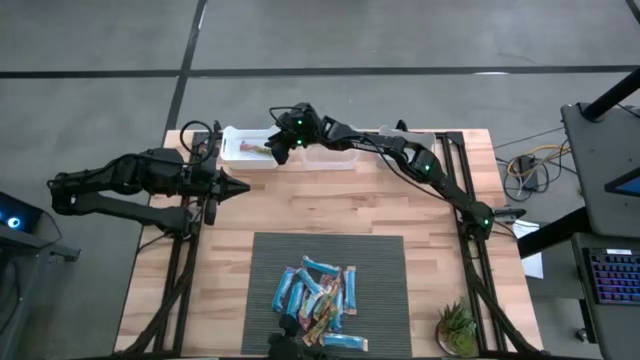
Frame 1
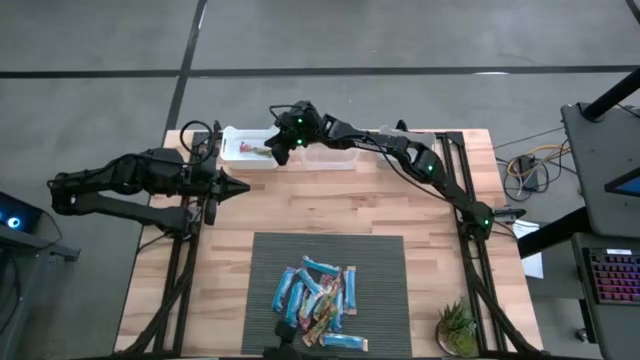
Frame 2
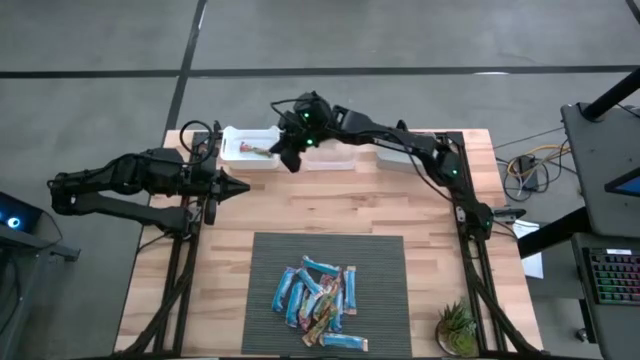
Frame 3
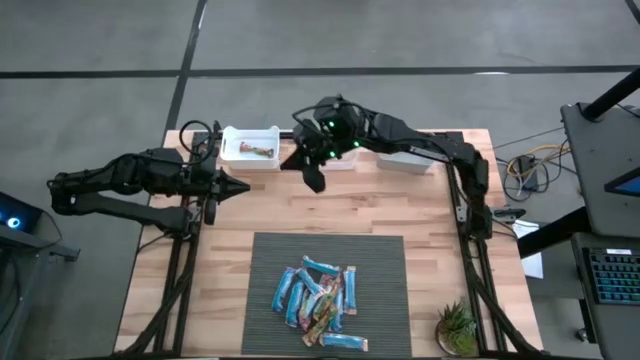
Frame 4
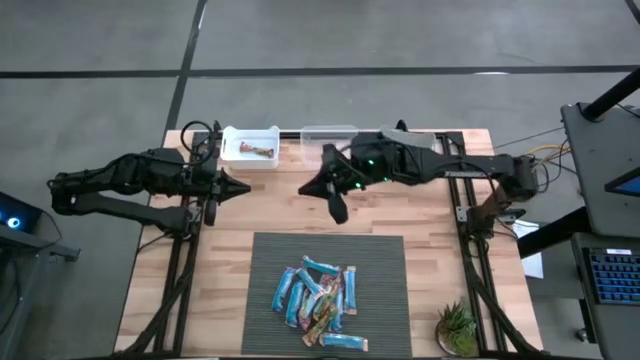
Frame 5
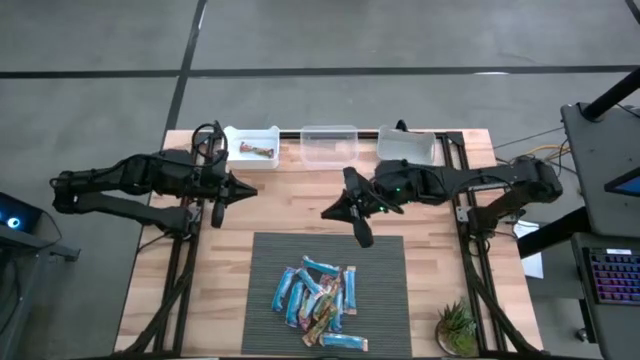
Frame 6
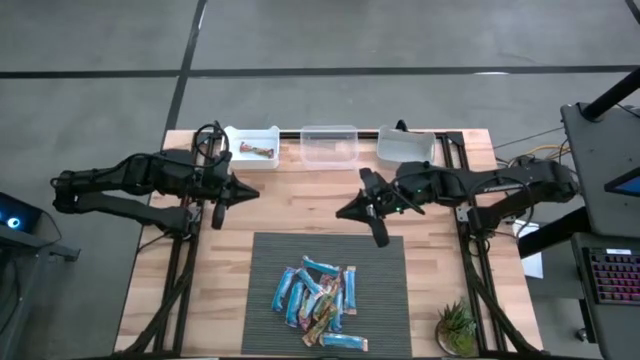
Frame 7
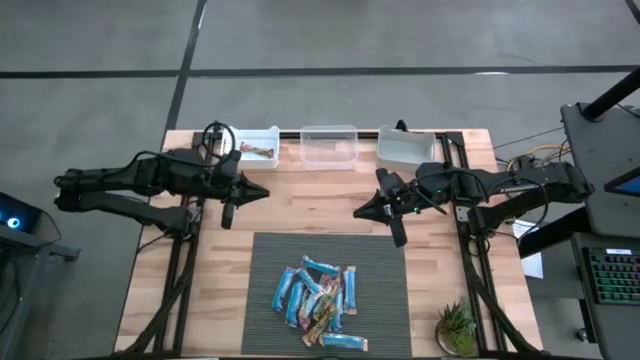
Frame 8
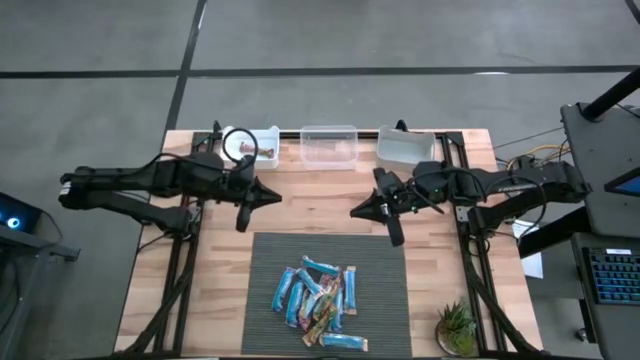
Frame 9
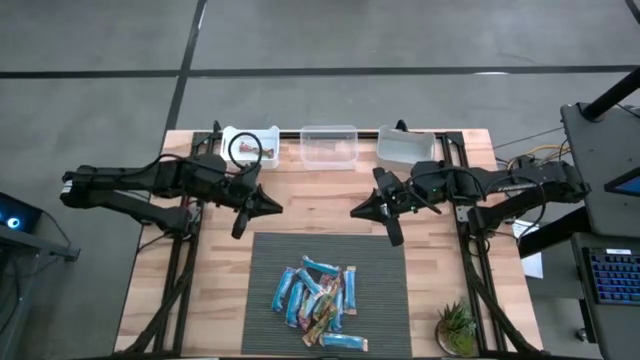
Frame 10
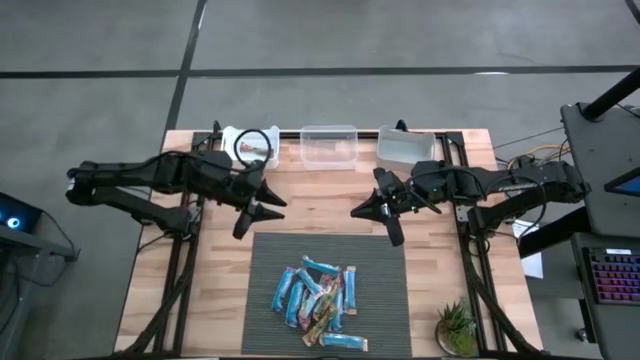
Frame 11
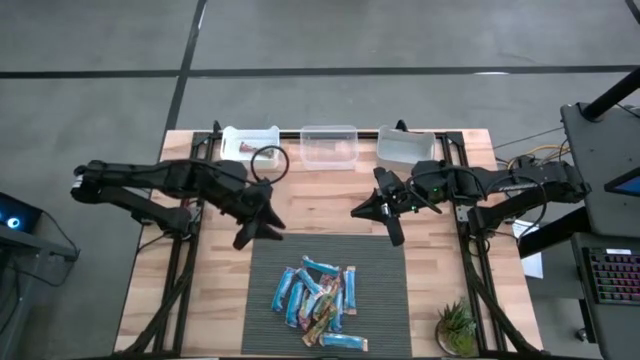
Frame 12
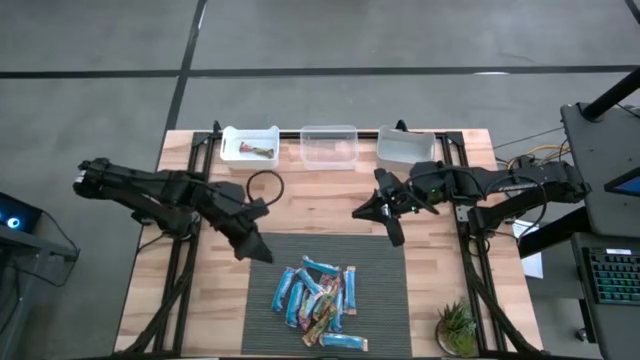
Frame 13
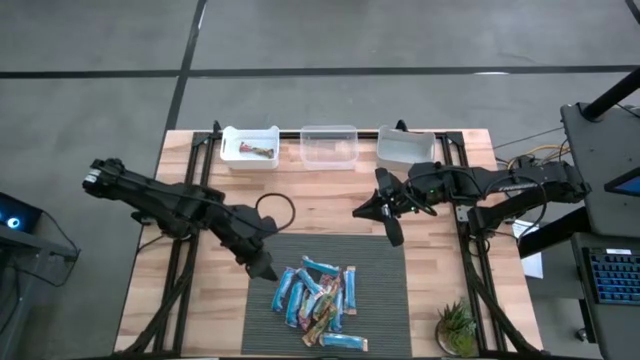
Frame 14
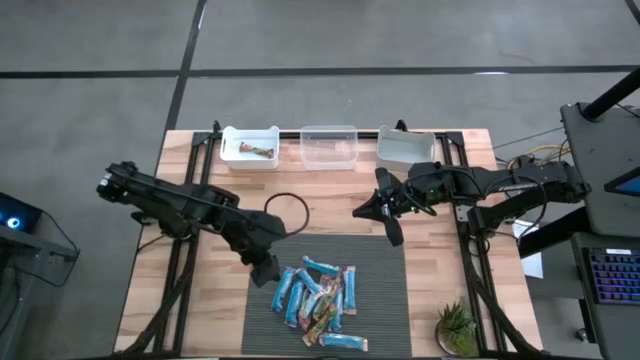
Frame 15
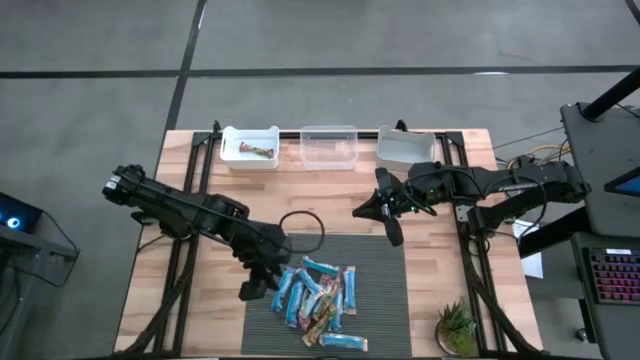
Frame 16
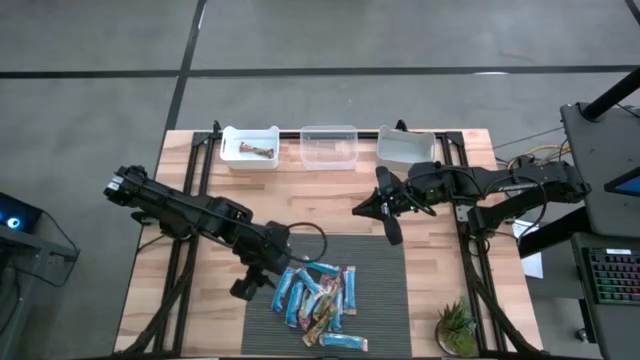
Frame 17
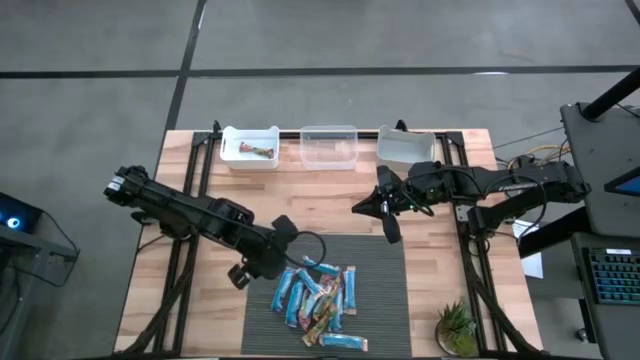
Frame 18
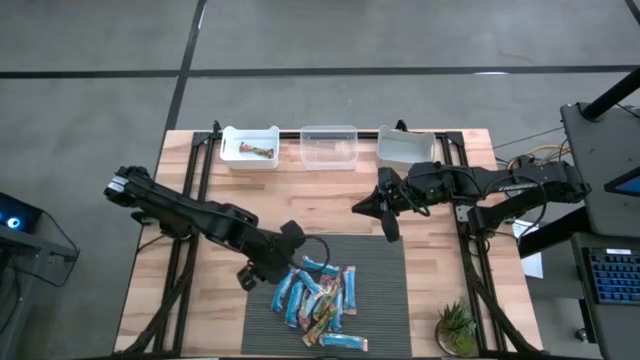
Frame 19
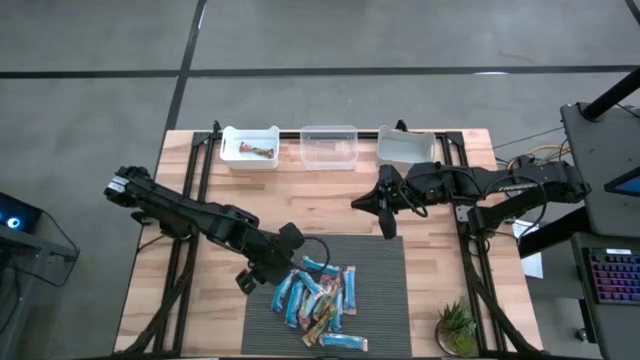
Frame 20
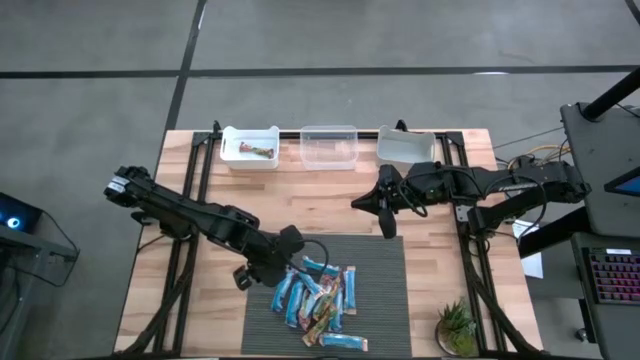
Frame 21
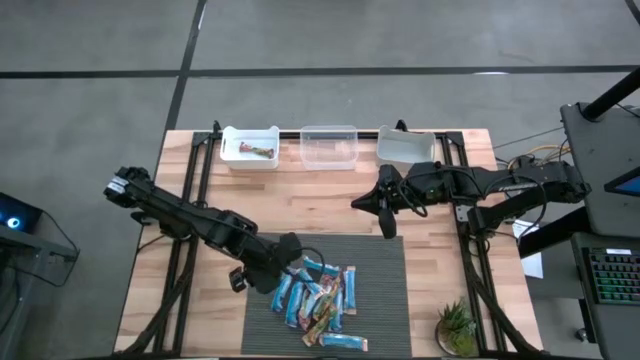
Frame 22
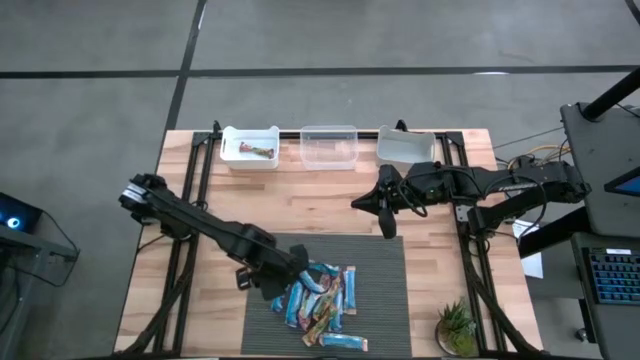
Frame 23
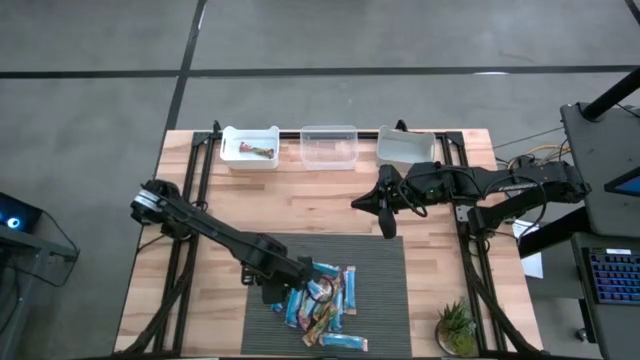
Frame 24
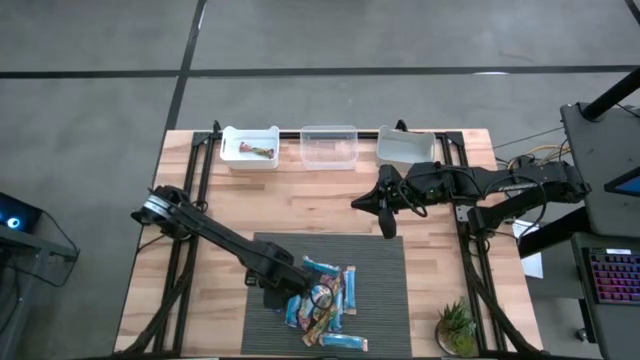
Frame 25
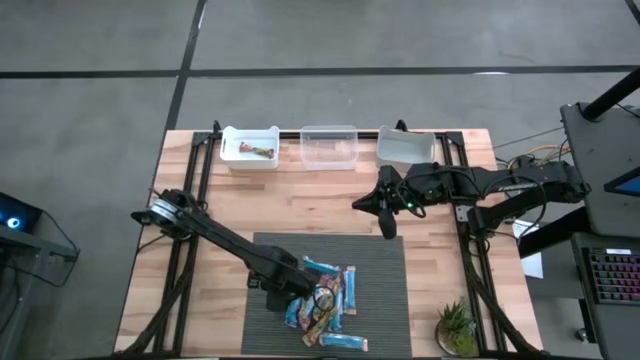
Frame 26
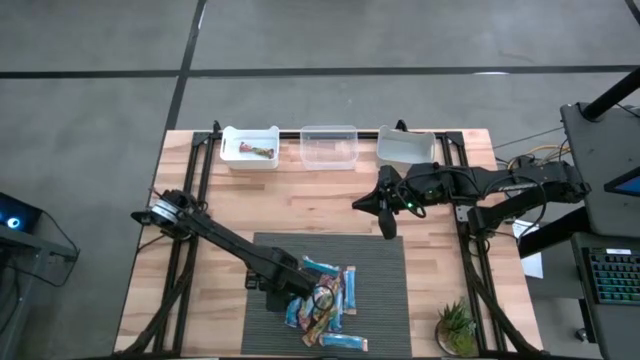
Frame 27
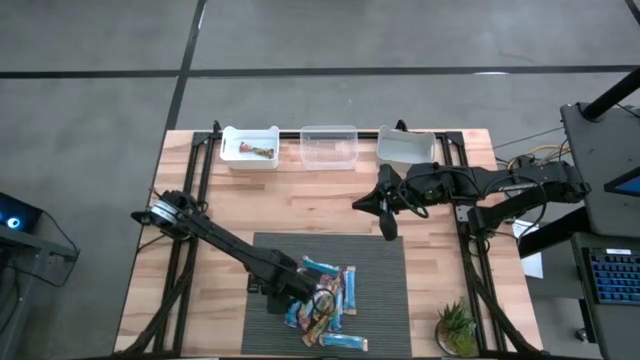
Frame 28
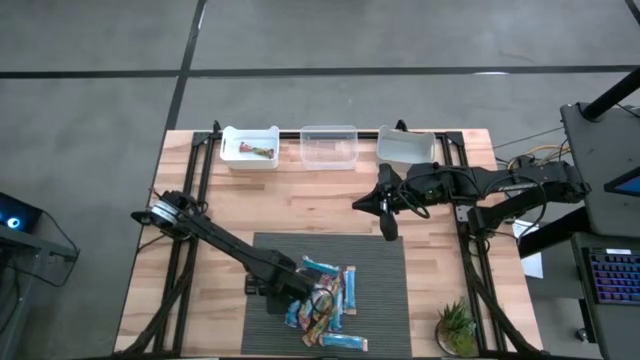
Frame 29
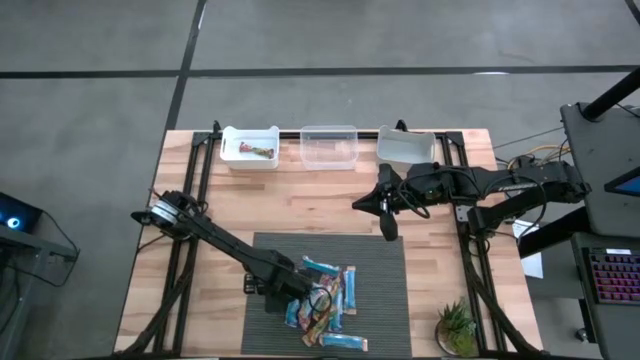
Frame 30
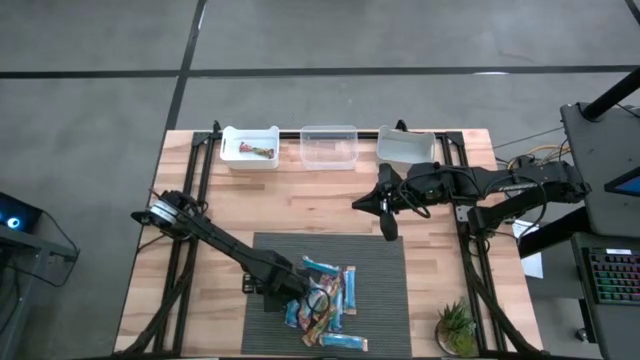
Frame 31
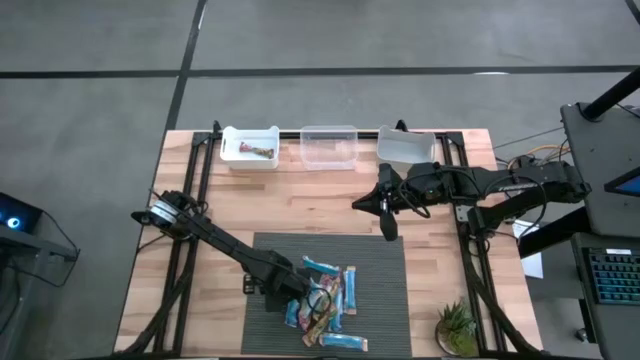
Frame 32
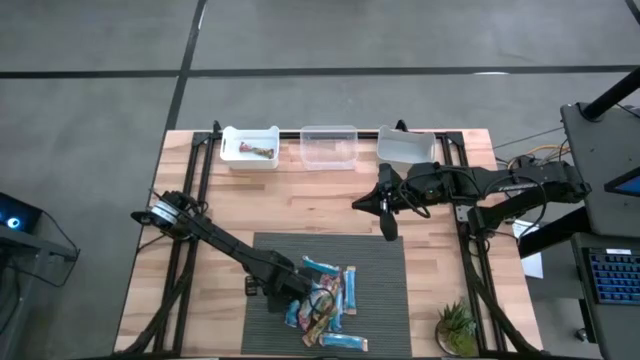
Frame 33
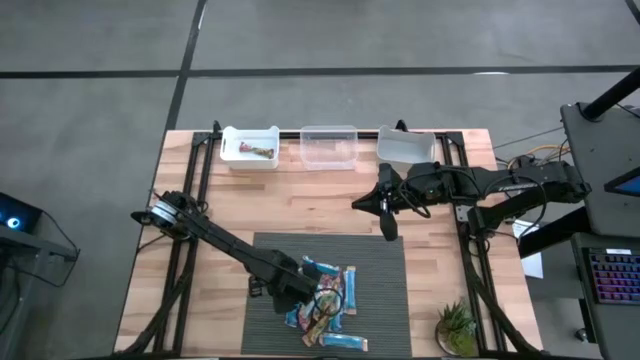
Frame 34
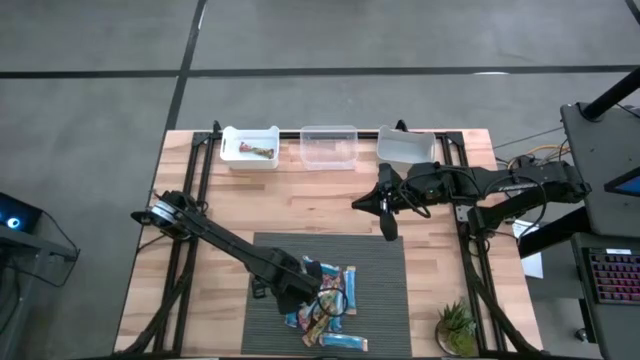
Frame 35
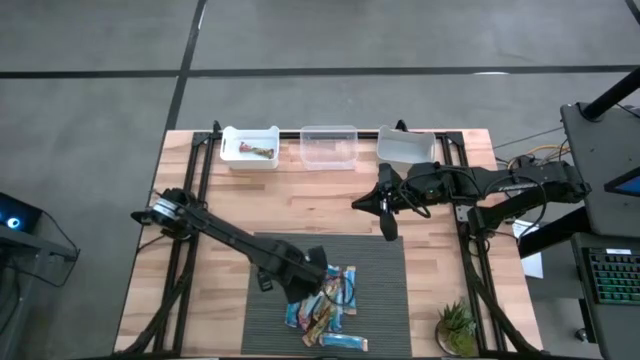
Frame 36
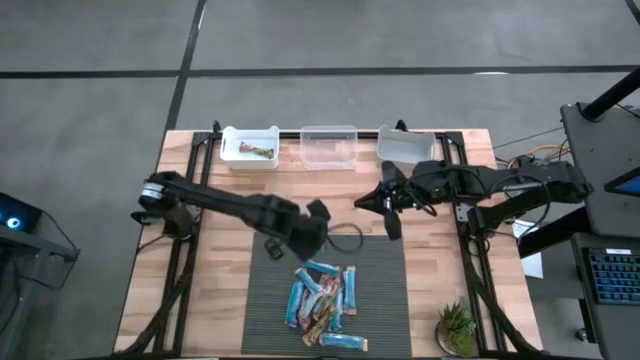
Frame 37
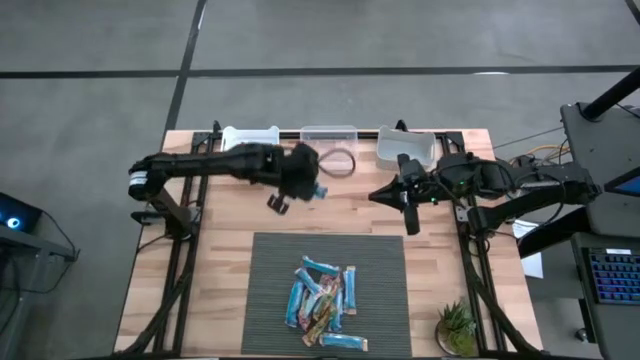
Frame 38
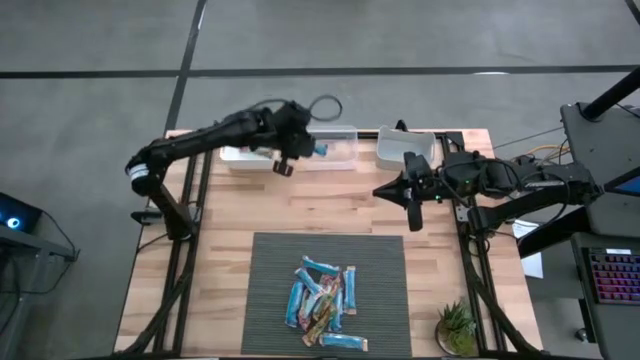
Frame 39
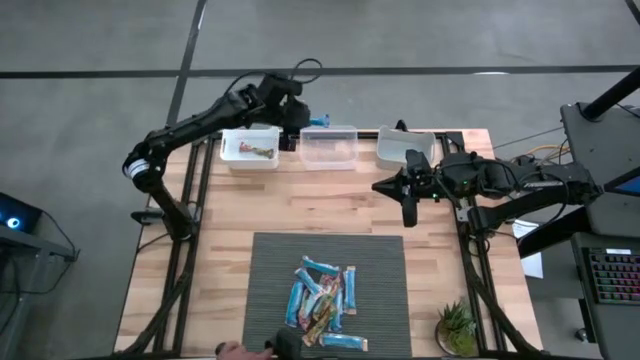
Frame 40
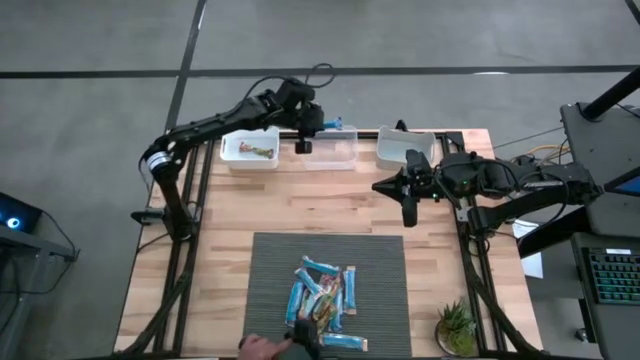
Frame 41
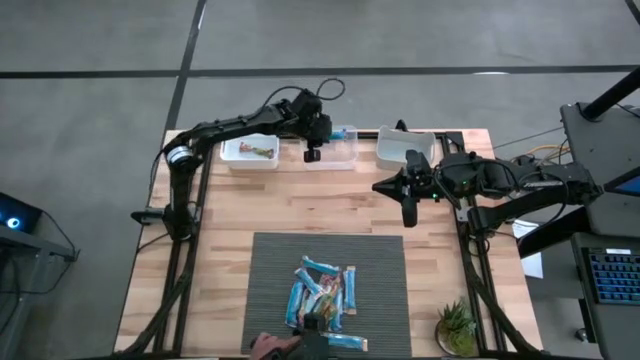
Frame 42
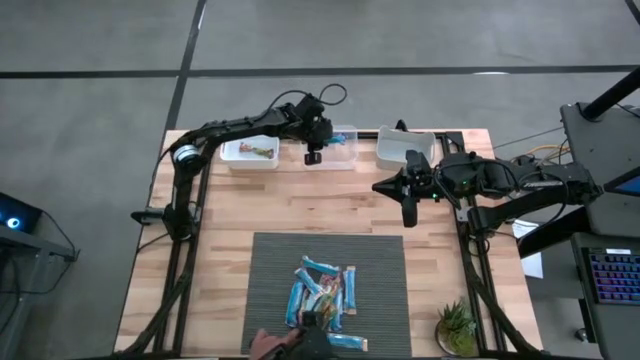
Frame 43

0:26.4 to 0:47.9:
Task: Pick and place Granola Bars by type
Put the blue granola bar into the transparent bin
